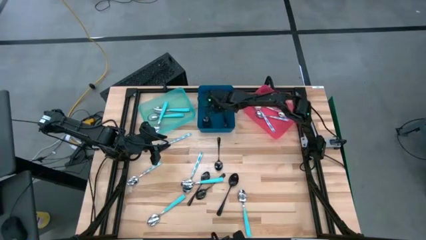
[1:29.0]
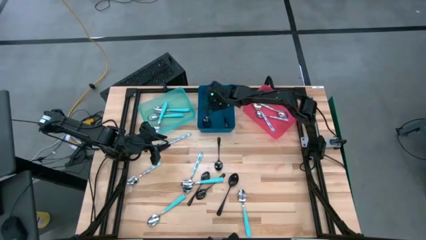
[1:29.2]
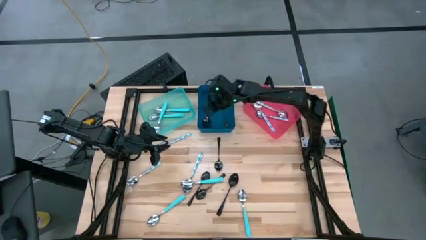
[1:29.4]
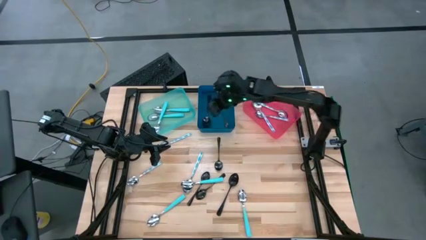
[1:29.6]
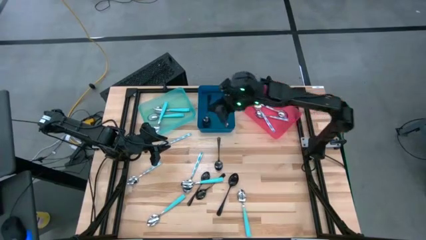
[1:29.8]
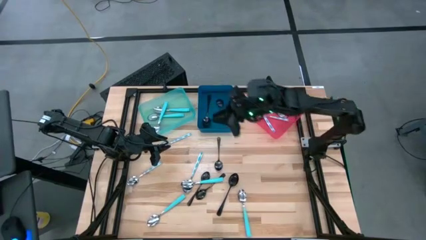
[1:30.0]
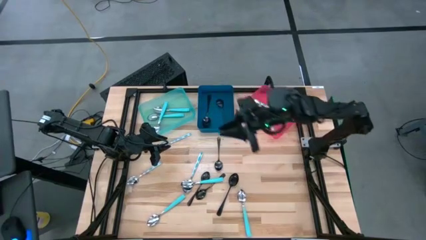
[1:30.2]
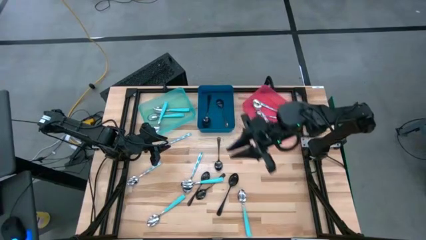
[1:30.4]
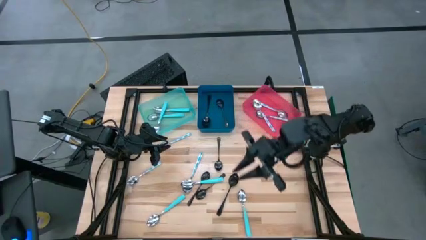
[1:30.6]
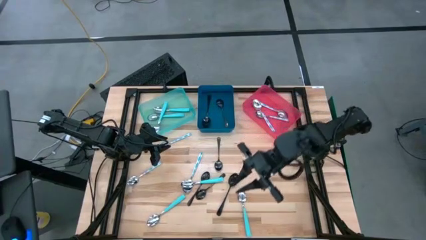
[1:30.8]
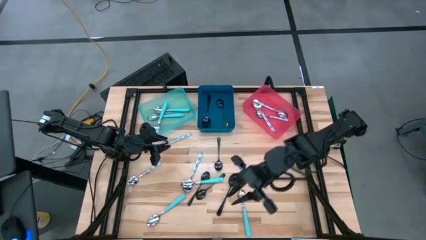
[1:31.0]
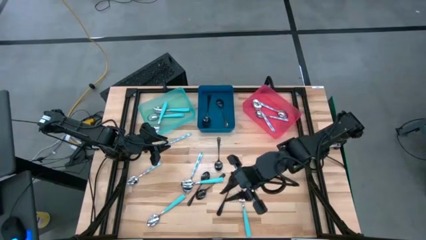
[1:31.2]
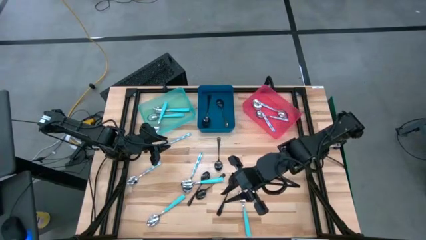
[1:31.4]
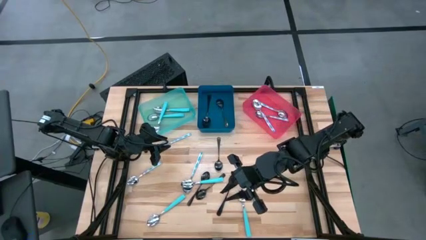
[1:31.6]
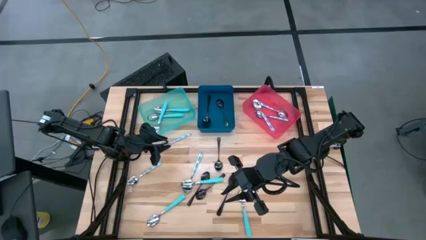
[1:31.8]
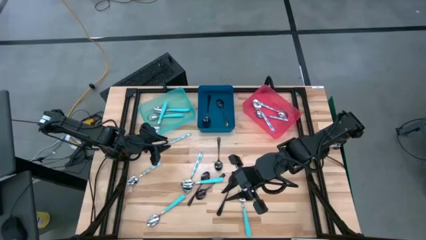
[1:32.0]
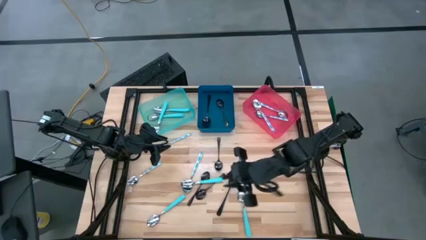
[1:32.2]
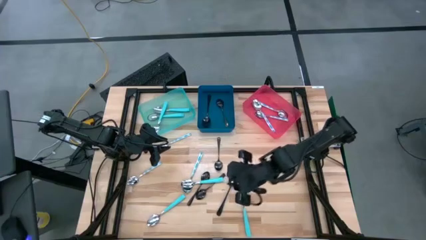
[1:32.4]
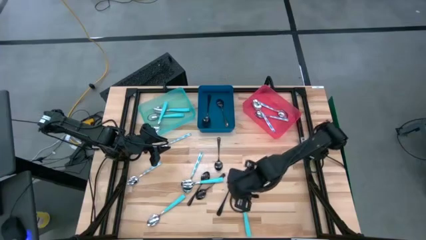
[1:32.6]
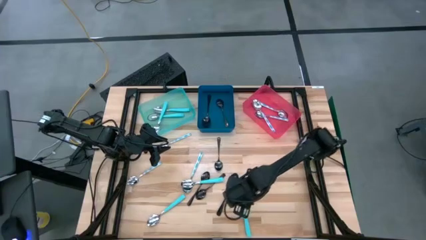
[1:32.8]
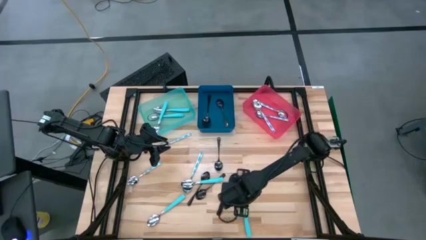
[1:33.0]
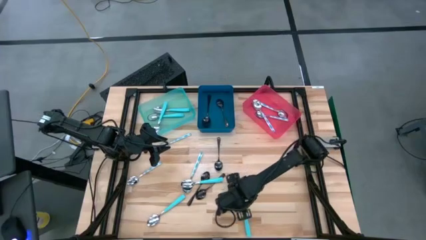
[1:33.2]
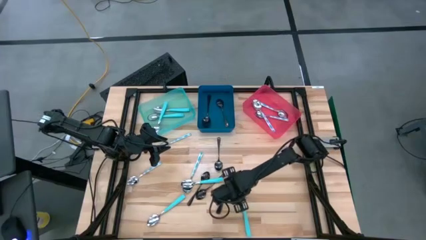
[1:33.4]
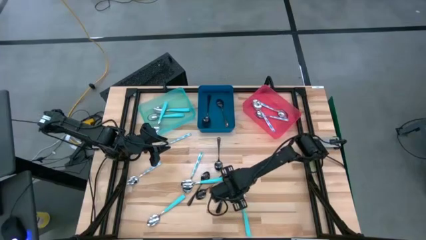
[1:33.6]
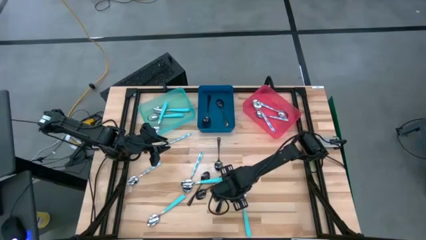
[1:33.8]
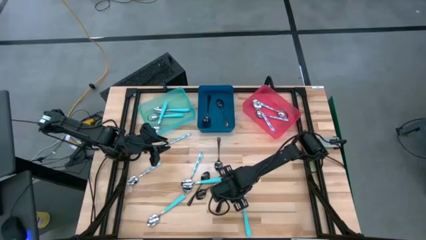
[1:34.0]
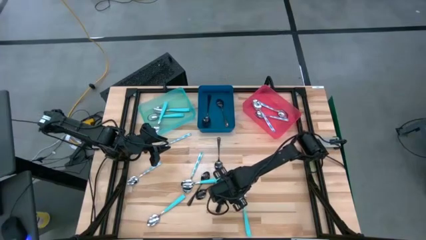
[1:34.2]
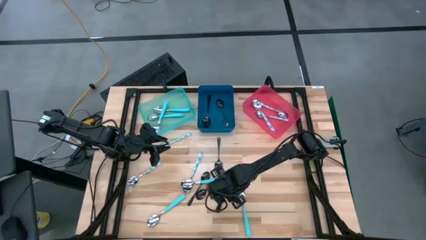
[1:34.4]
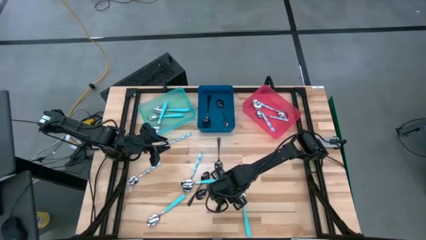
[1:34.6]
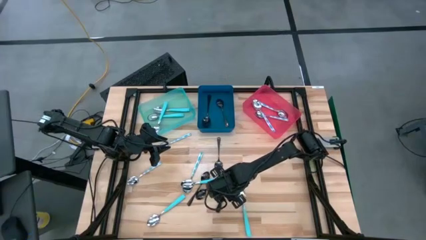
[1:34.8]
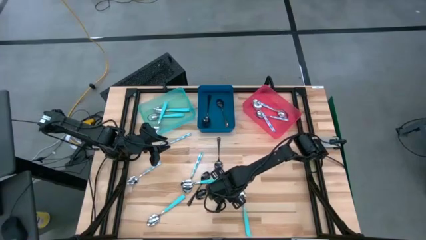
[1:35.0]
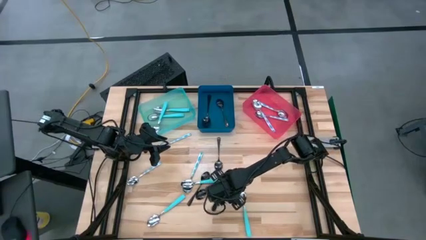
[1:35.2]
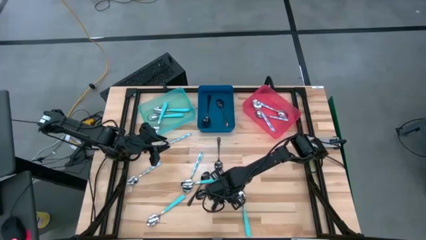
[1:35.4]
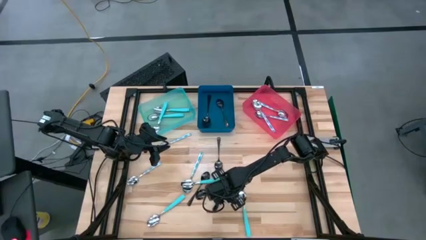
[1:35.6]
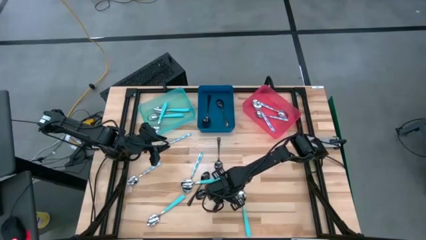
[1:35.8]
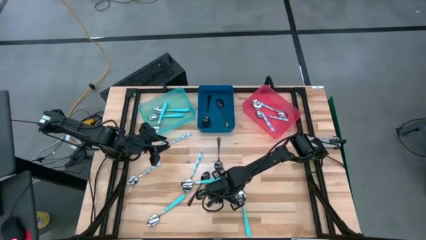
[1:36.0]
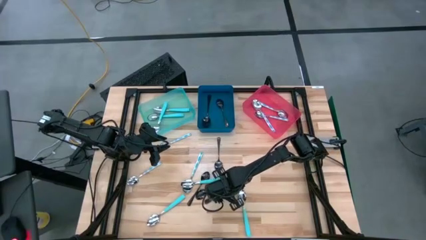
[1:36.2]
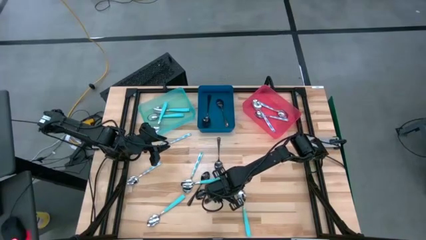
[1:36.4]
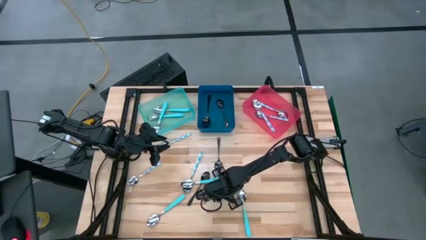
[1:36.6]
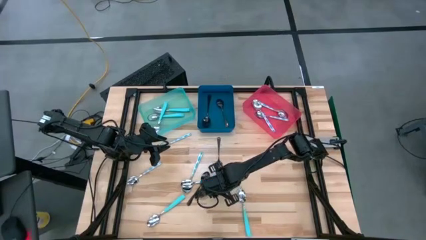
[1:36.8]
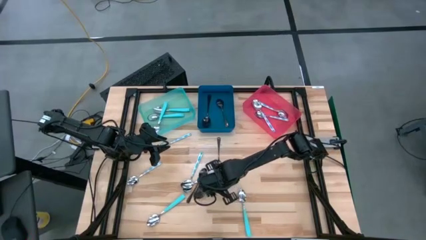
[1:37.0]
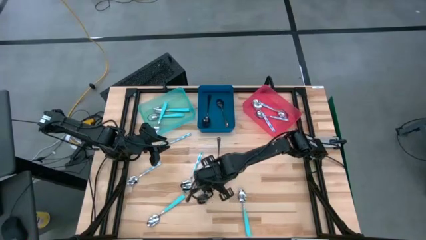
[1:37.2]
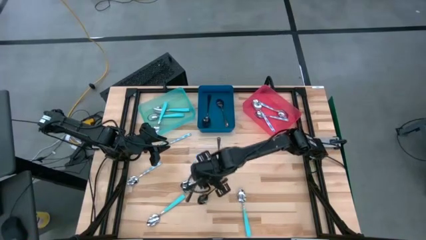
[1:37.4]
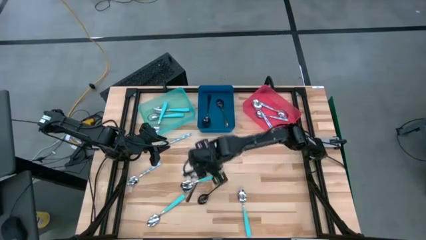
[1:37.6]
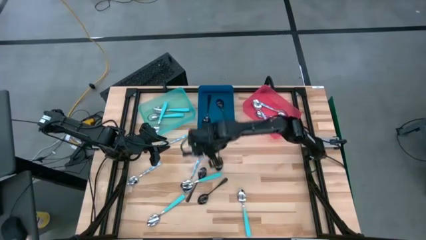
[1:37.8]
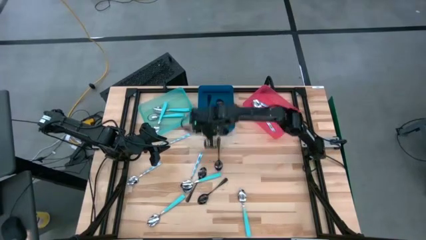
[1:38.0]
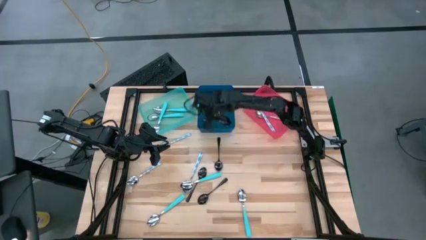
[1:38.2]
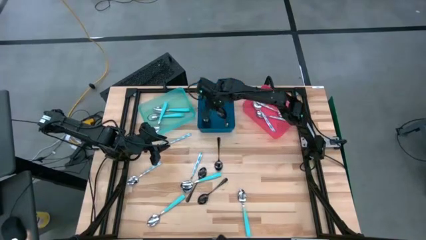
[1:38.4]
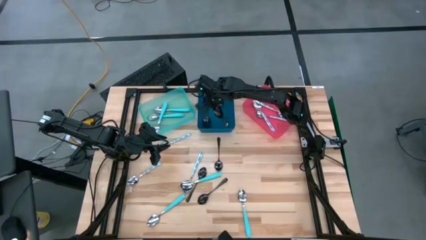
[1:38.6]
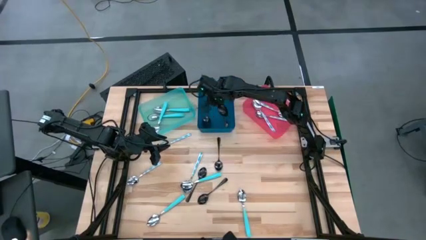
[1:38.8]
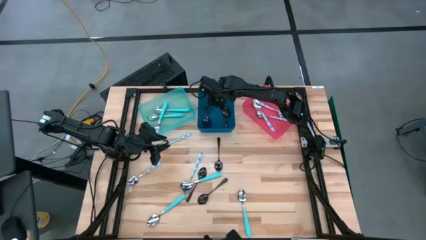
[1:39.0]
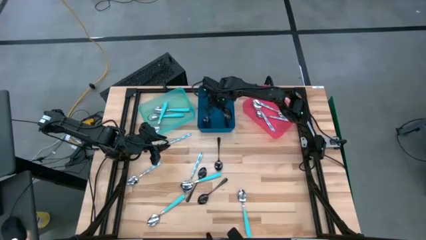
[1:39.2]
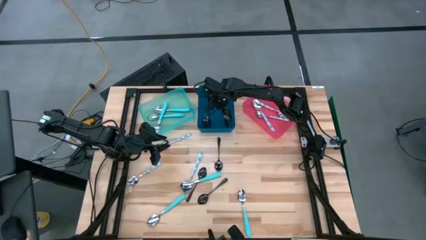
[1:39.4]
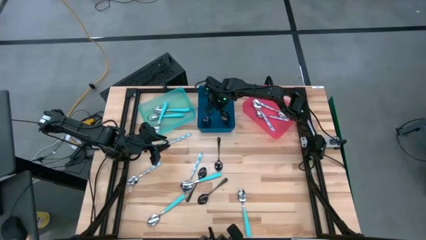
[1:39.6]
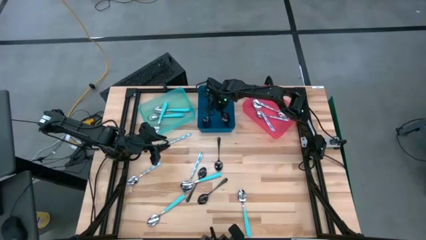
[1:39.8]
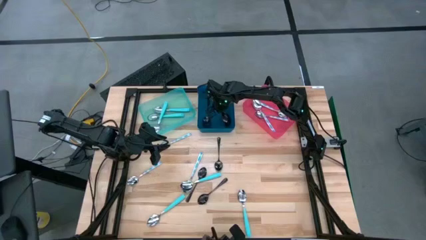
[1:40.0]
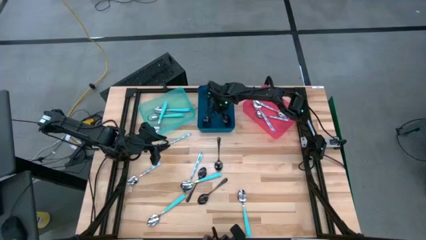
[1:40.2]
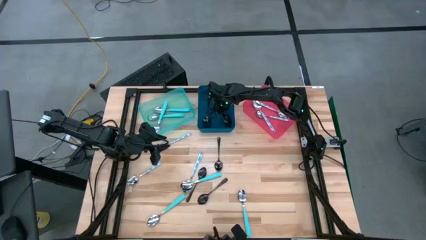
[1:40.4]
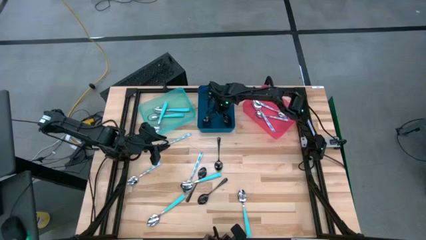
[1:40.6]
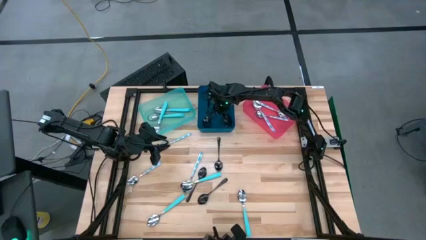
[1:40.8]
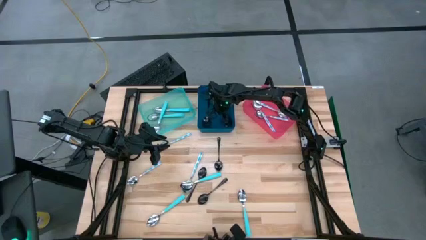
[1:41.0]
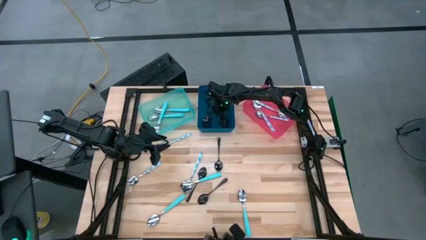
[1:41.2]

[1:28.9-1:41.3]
Task: Sort silverware by color (type)
Put the black spoon into the blue bin
